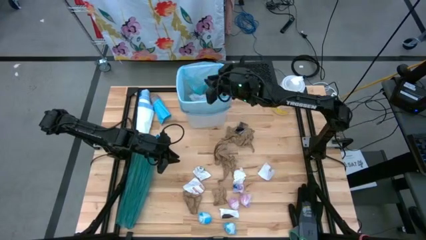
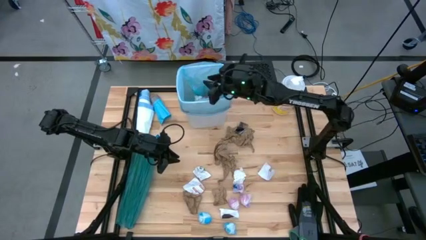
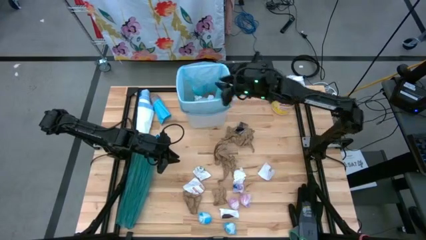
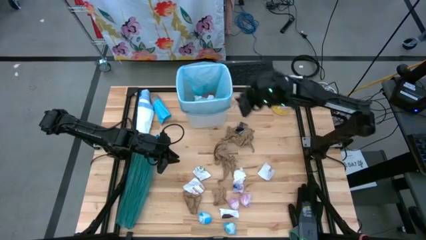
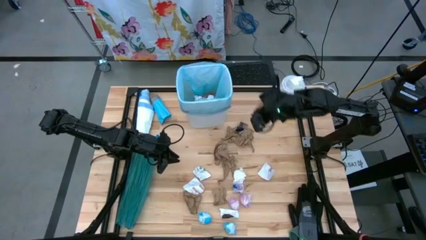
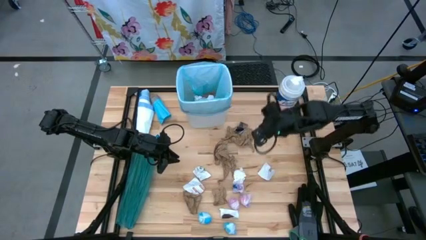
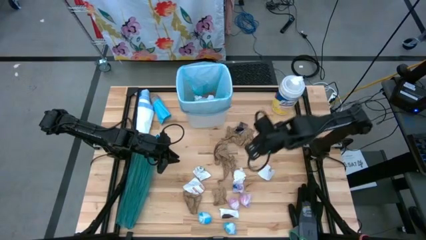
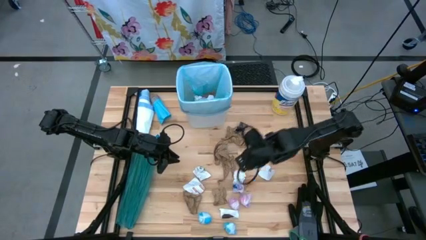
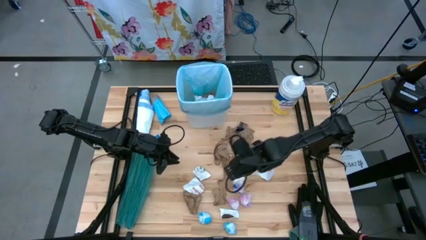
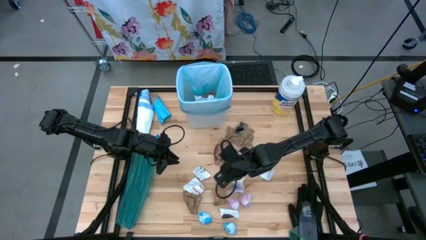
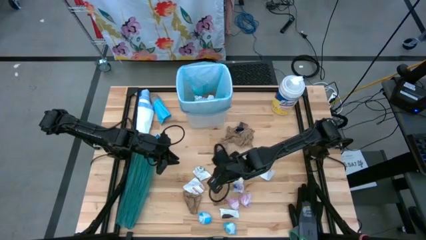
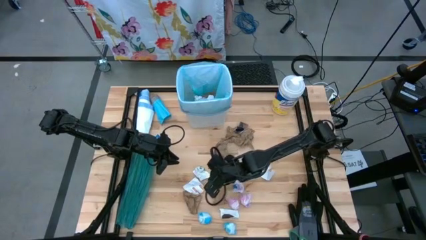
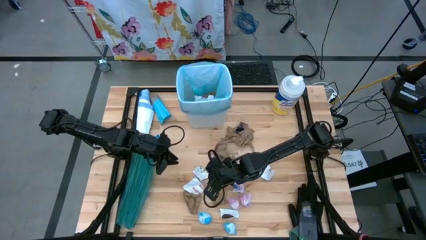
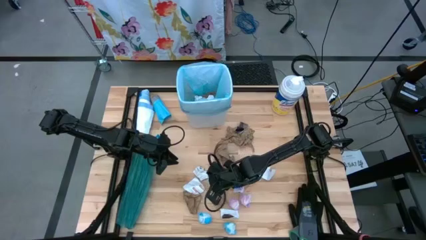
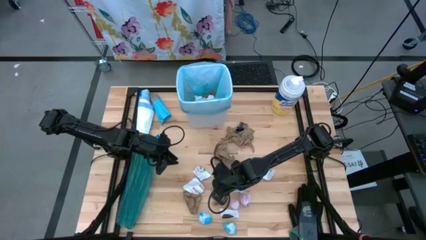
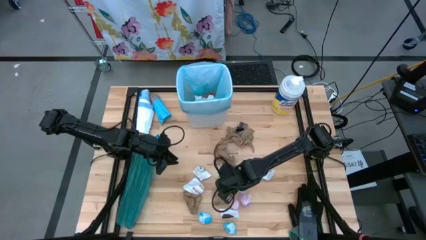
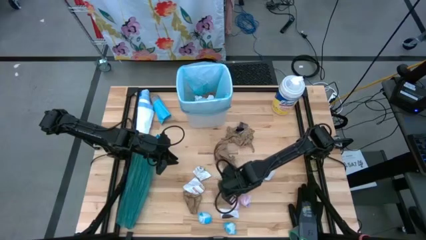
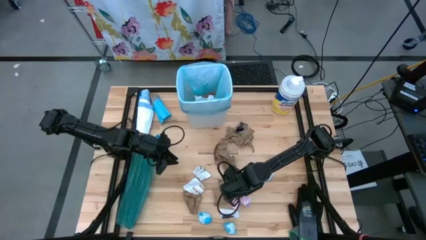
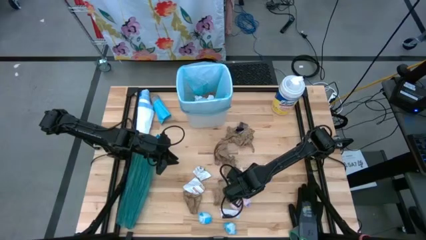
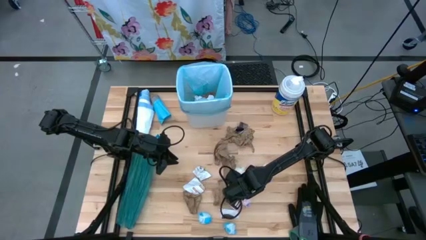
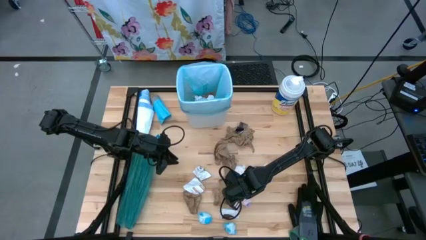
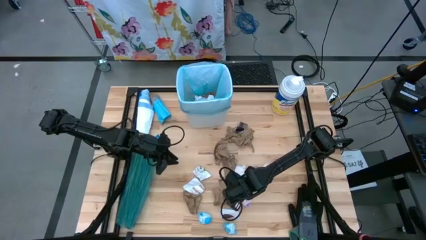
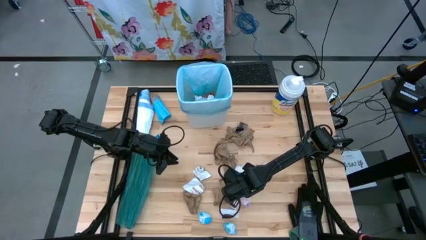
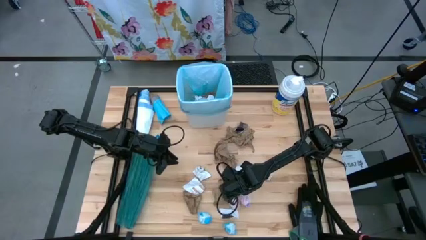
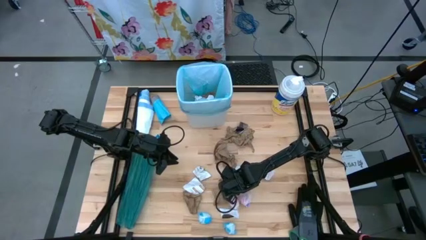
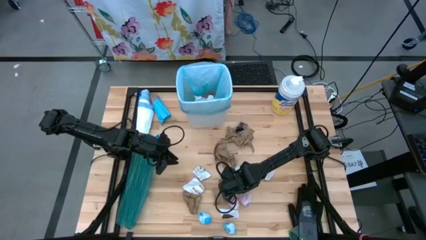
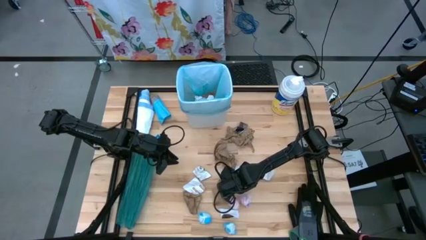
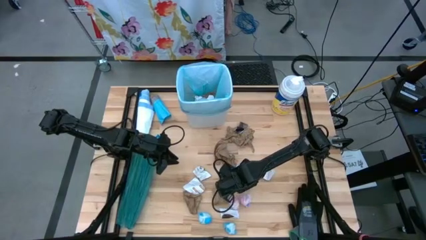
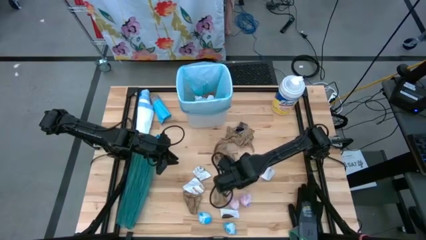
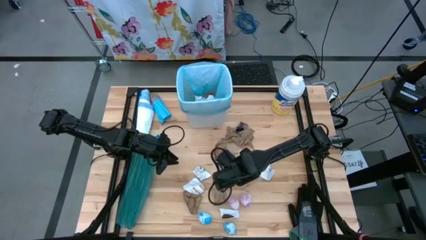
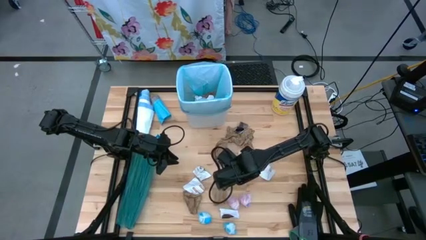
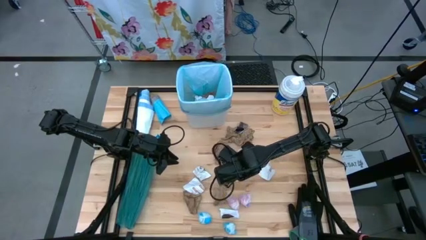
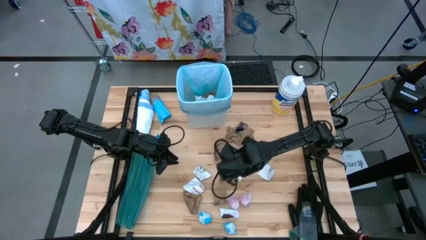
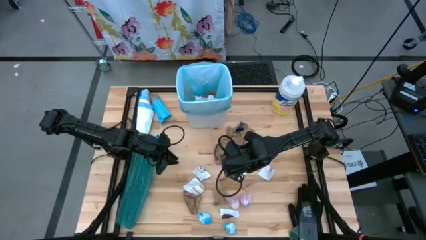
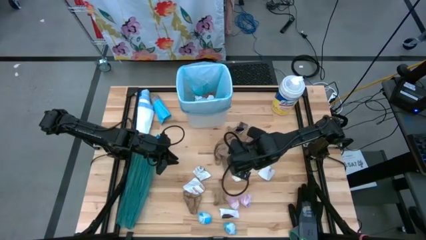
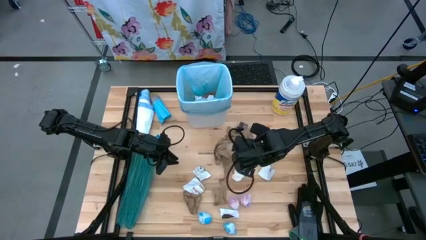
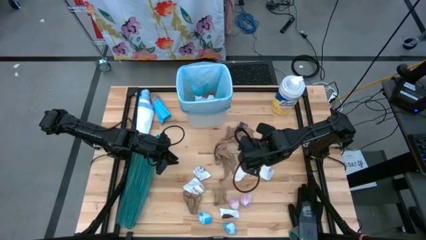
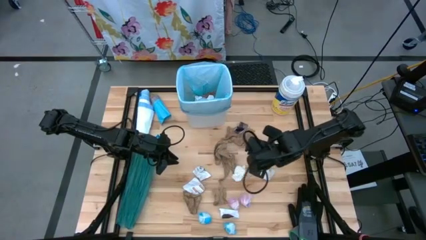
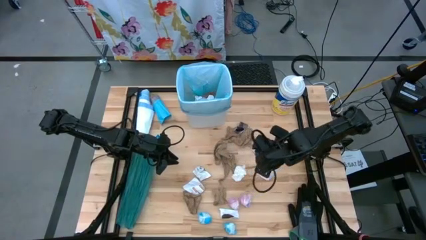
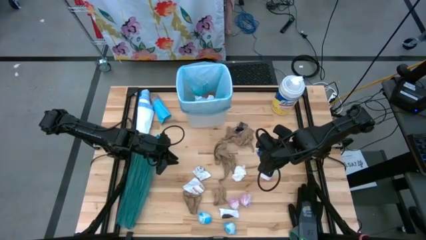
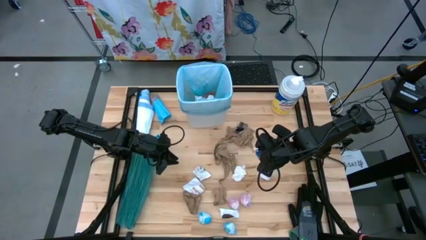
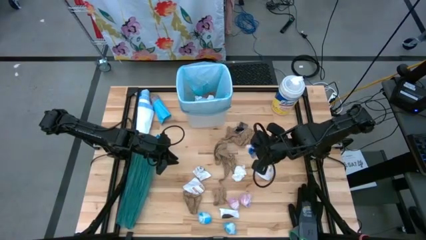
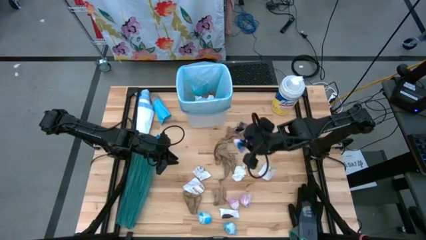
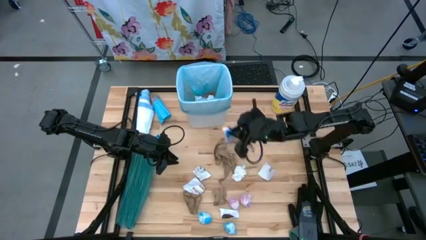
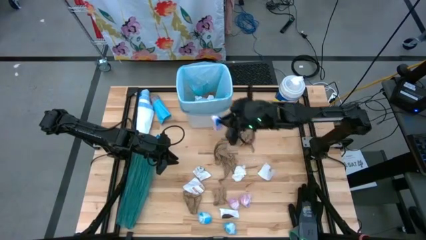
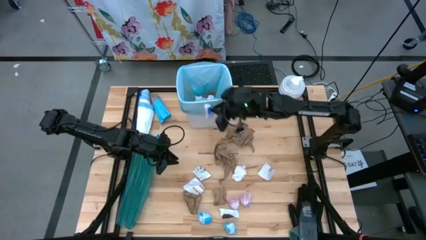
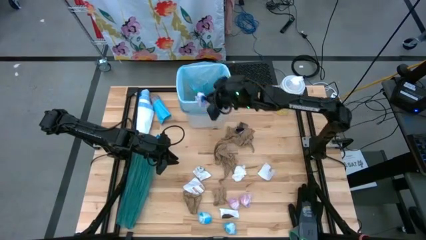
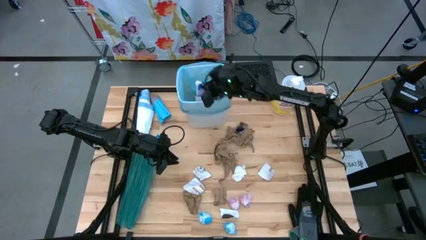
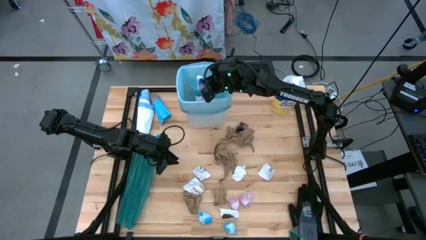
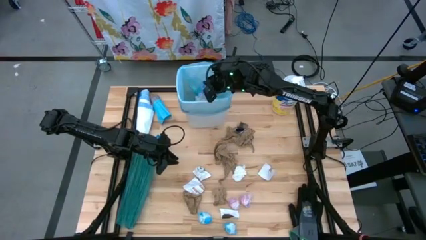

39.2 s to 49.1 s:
Task: place trash/remove bag and relplace
Put the pink plastic into the white trash bin

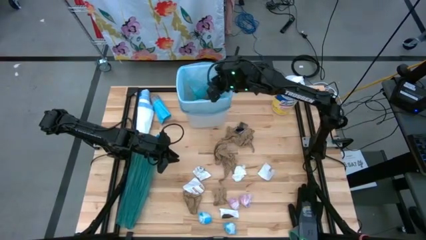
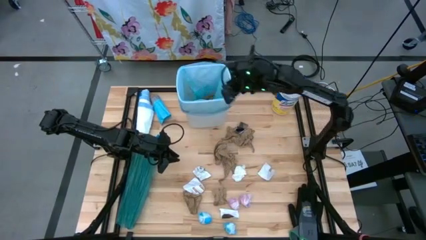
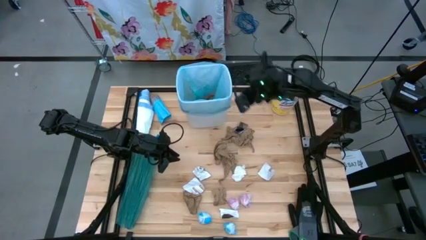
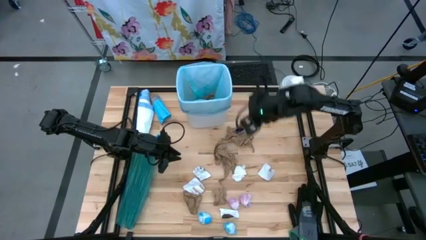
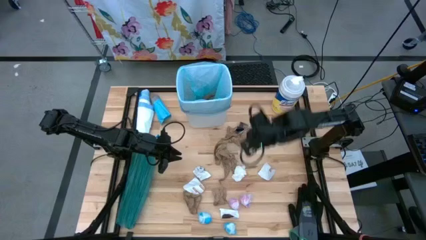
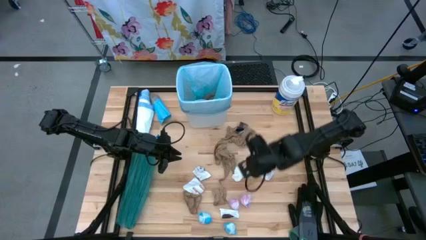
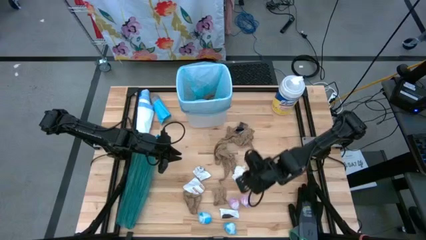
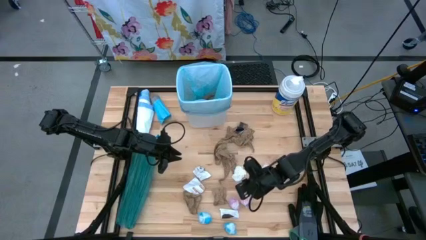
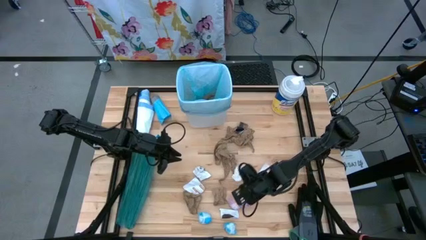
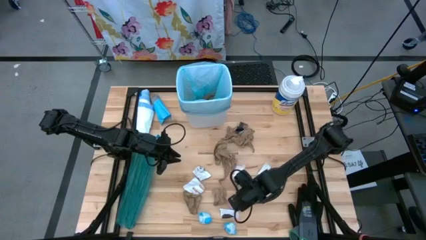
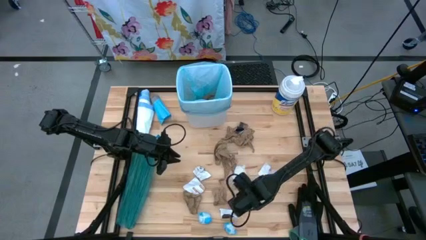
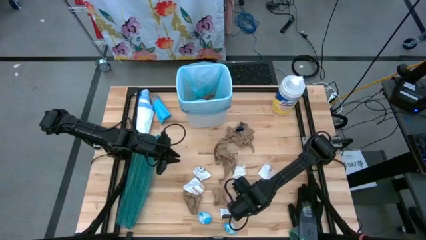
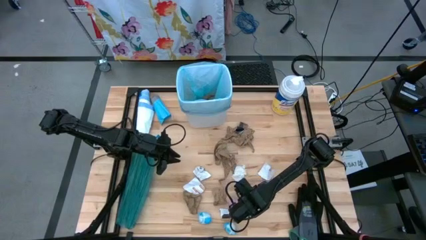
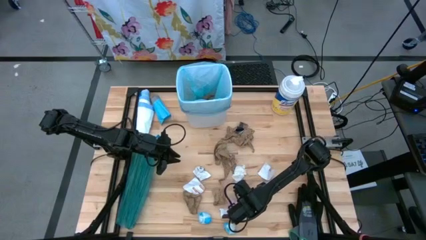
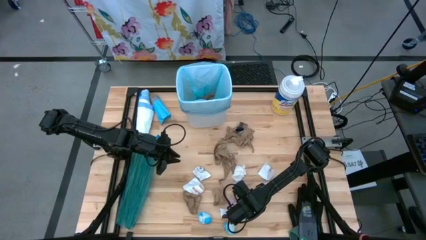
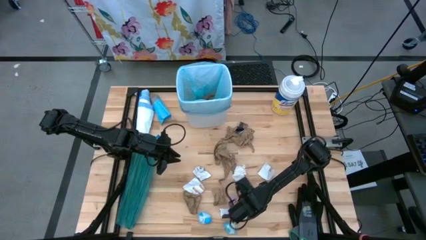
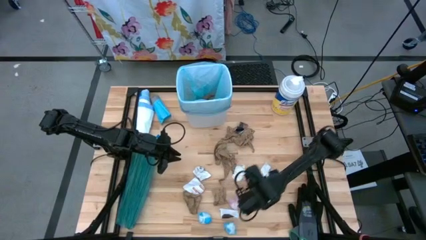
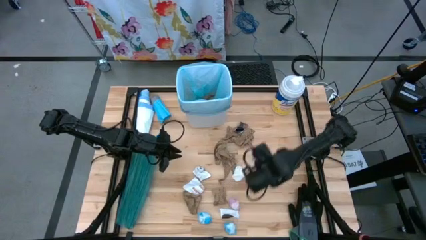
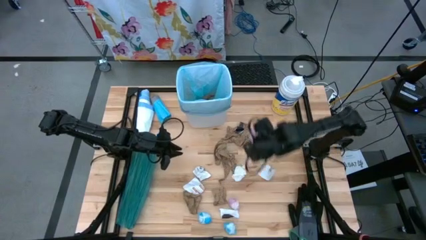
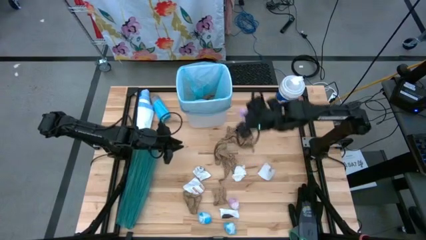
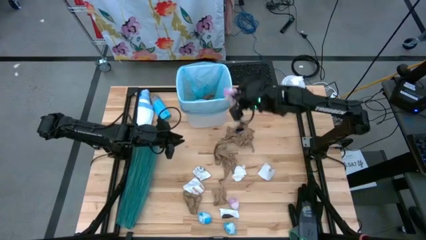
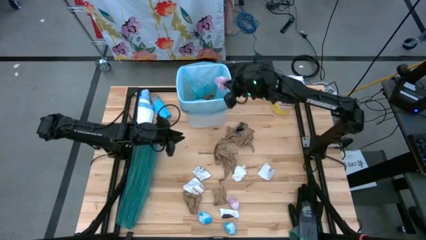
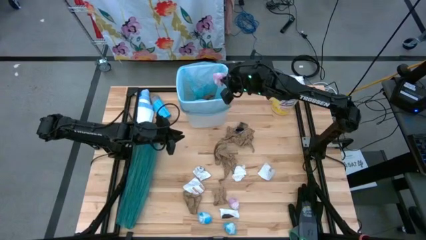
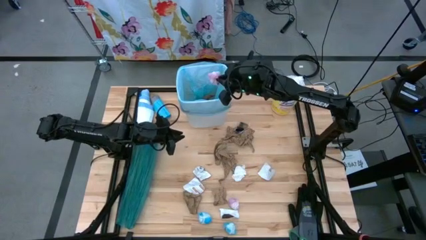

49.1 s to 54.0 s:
Put the pink plastic into the white trash bin

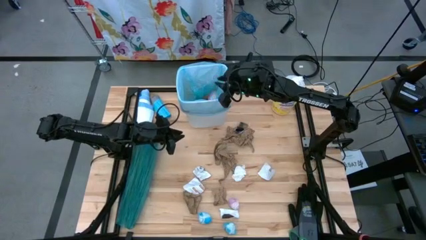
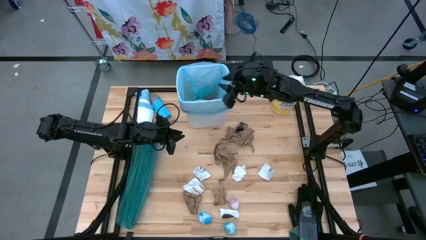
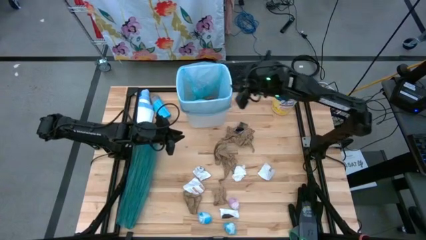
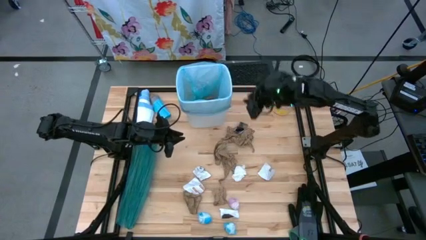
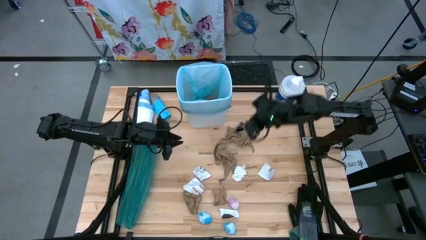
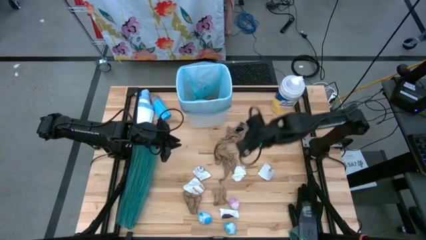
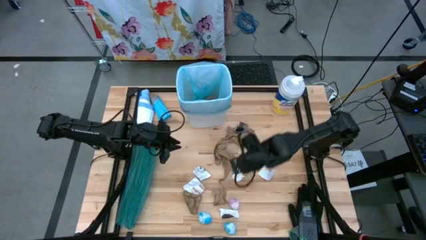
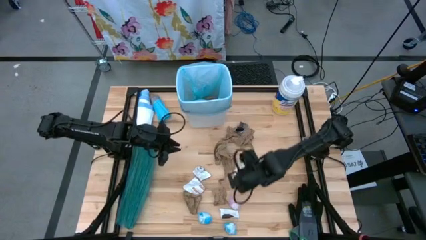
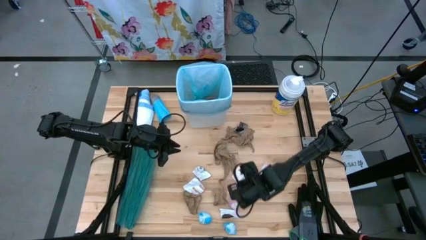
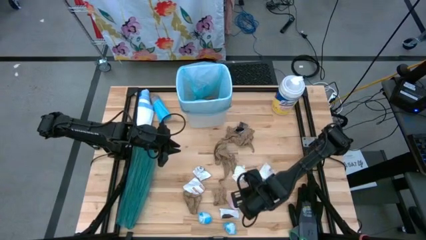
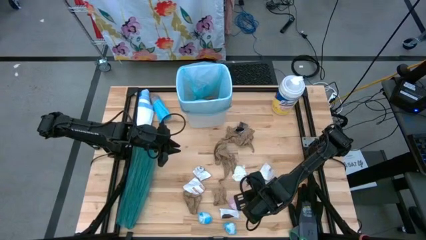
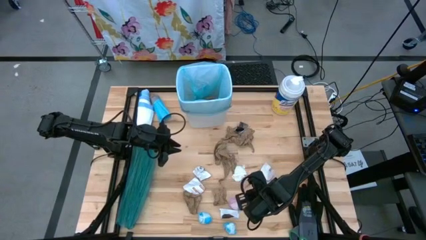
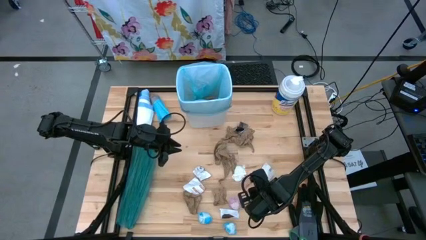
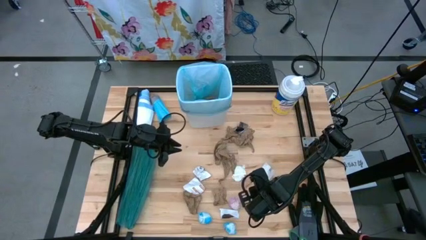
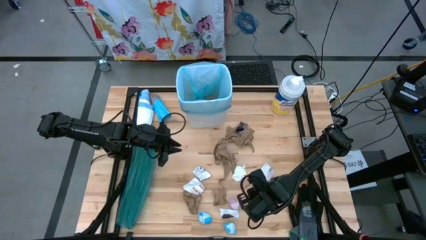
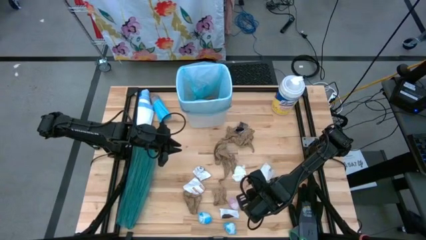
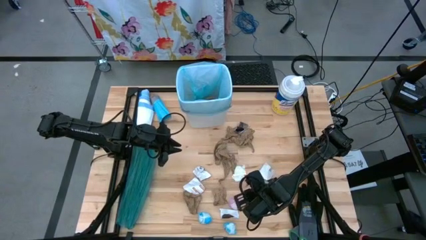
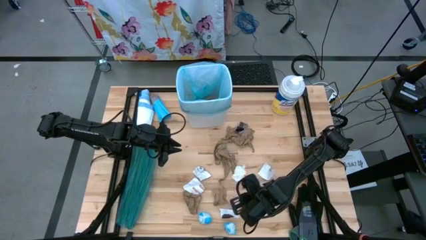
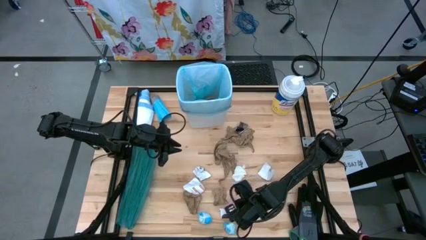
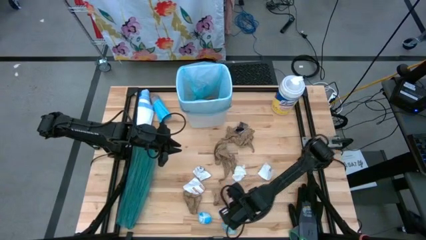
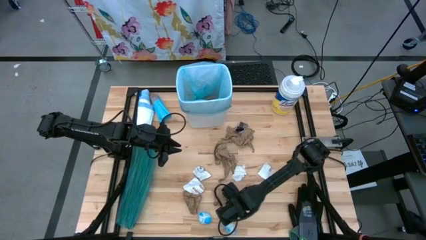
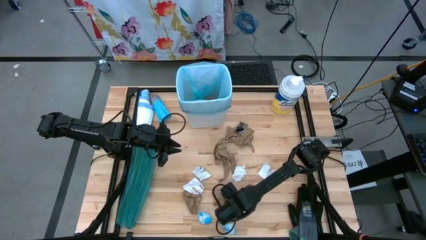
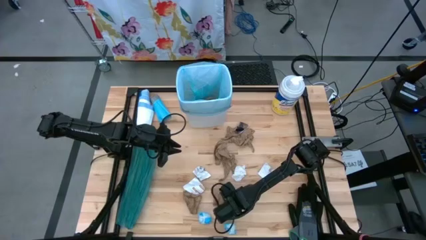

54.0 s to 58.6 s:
Put the pink plastic into the white trash bin
